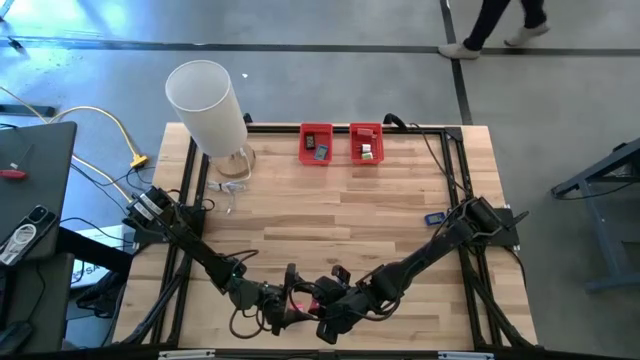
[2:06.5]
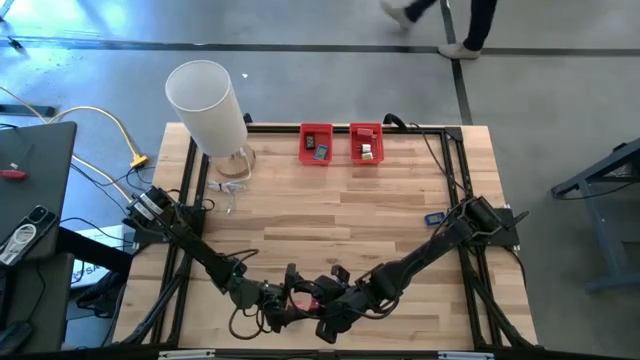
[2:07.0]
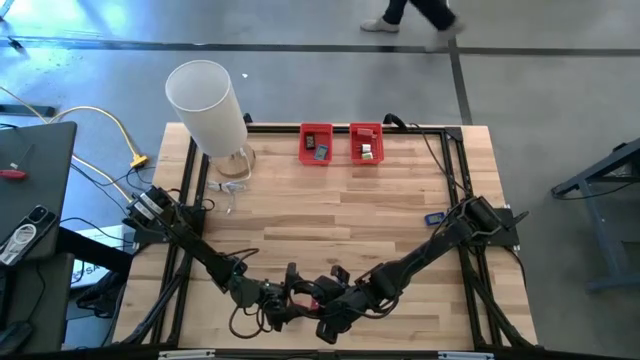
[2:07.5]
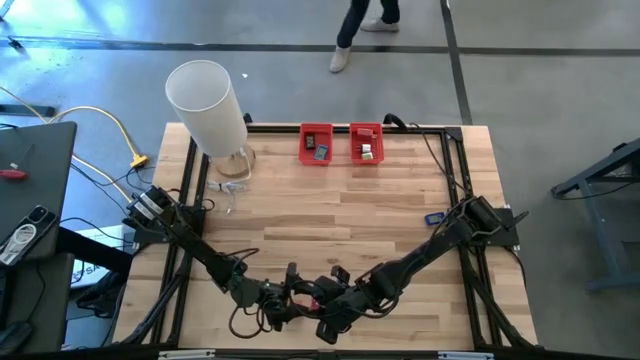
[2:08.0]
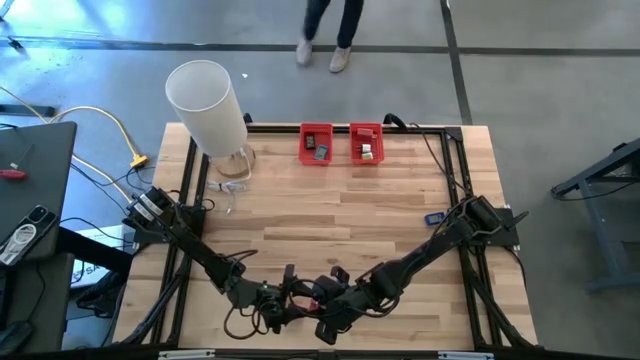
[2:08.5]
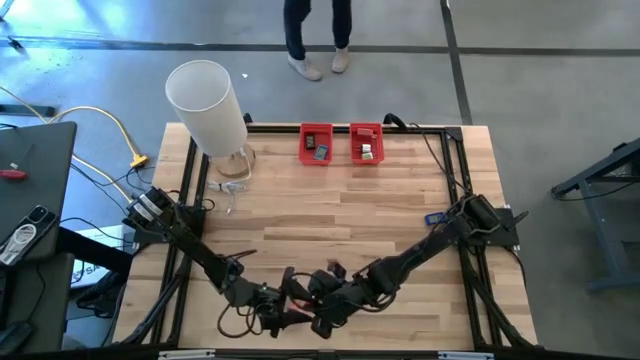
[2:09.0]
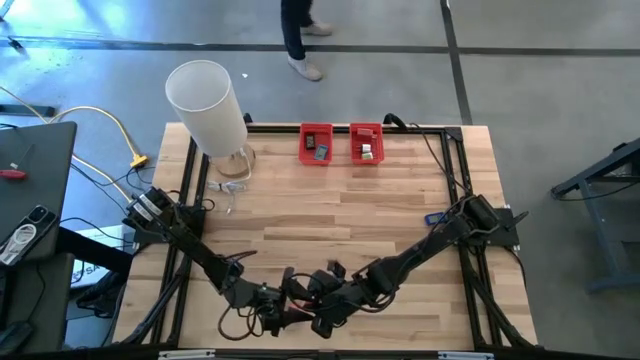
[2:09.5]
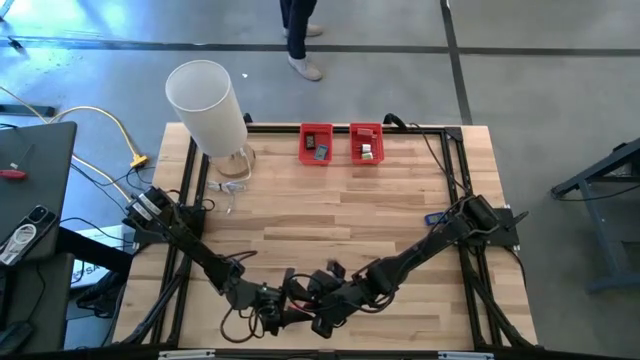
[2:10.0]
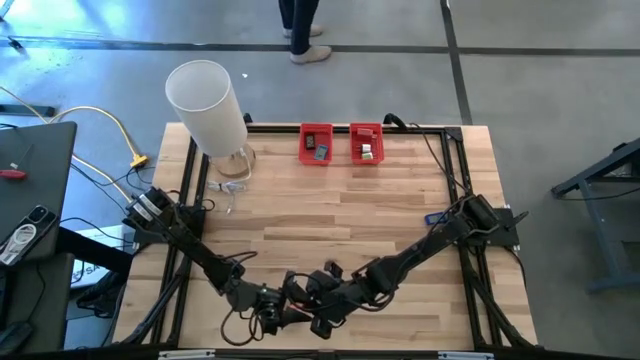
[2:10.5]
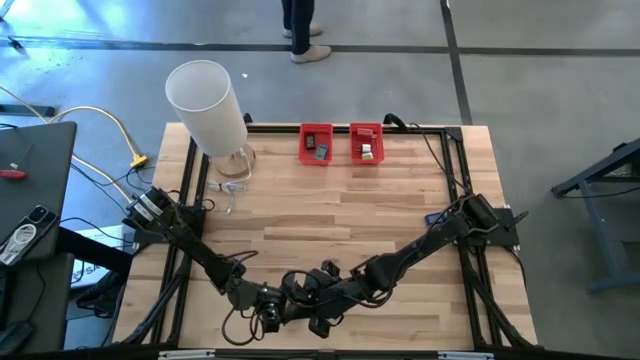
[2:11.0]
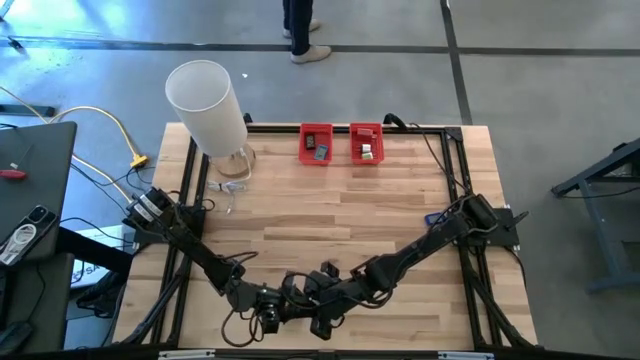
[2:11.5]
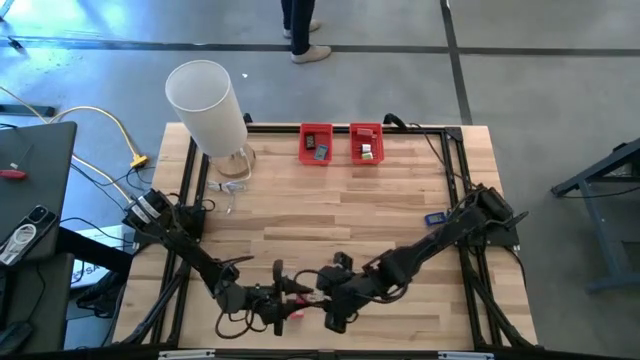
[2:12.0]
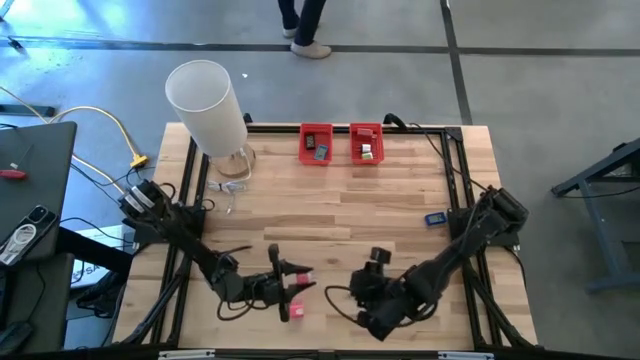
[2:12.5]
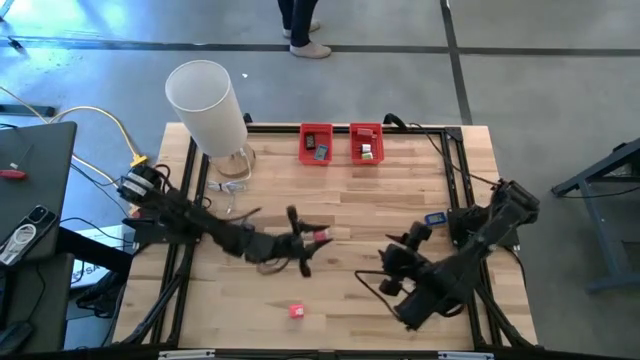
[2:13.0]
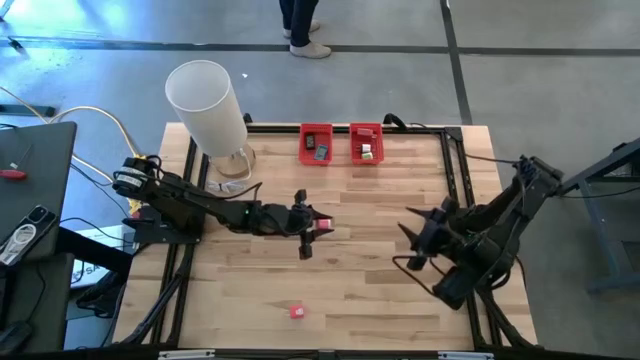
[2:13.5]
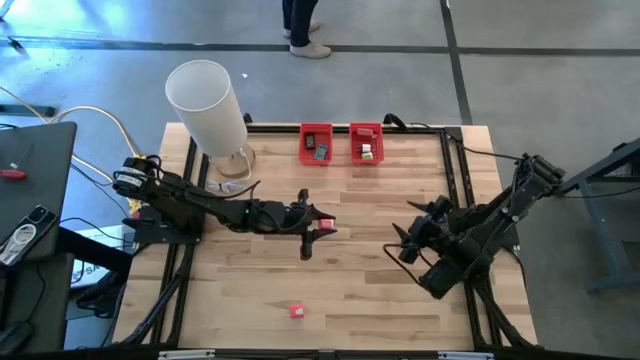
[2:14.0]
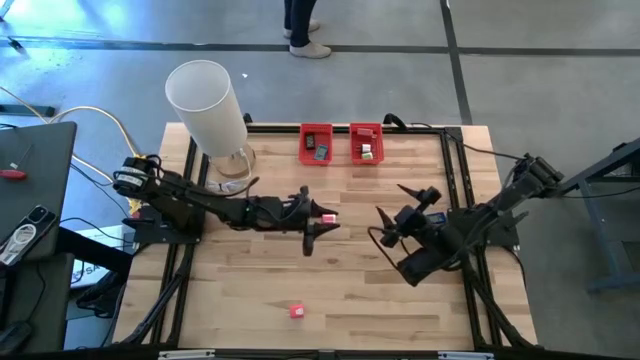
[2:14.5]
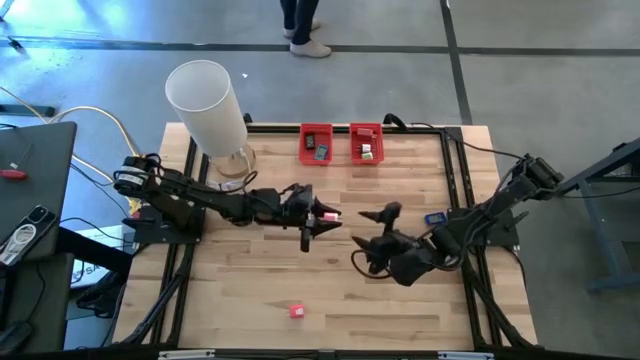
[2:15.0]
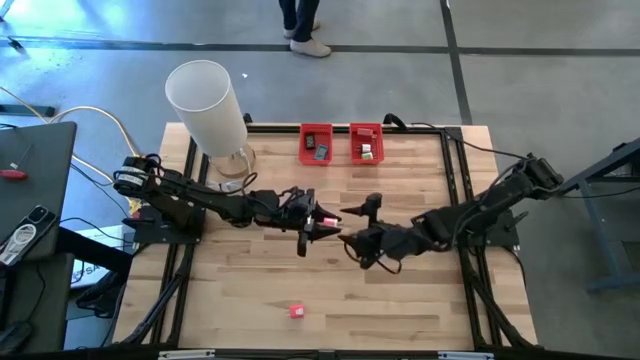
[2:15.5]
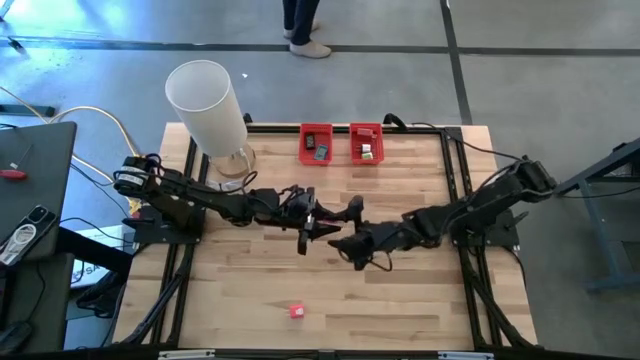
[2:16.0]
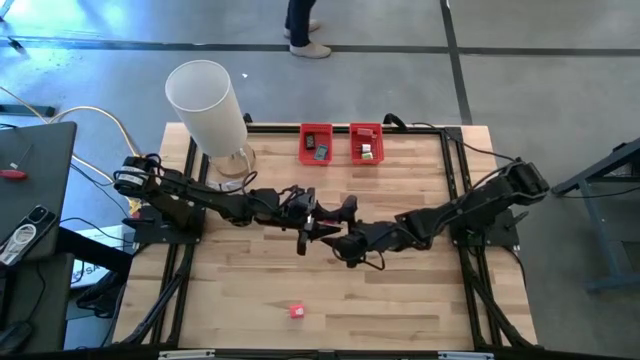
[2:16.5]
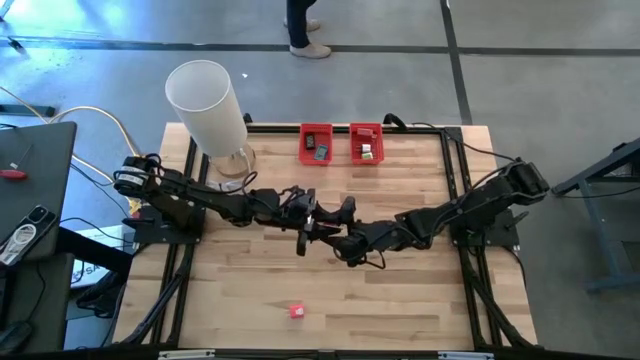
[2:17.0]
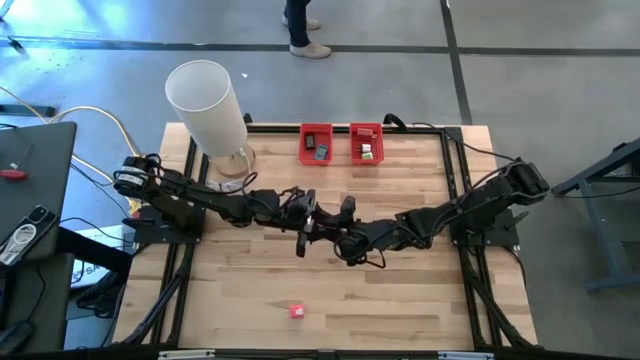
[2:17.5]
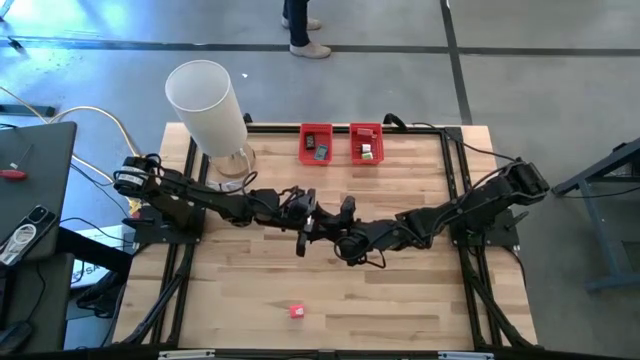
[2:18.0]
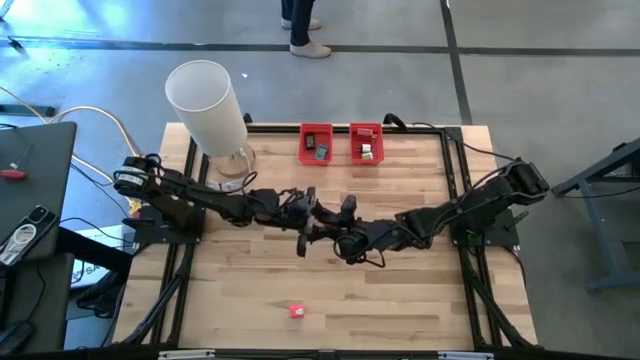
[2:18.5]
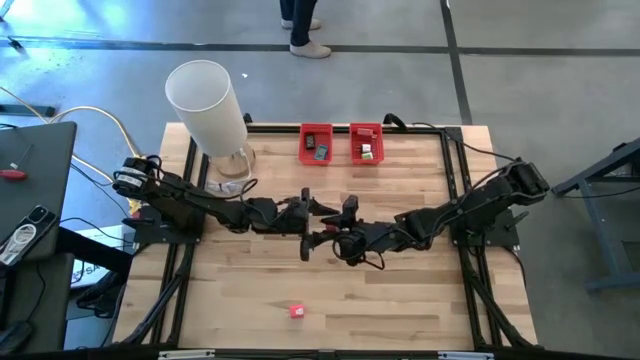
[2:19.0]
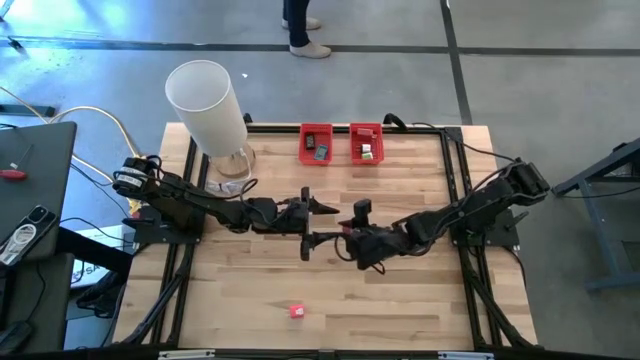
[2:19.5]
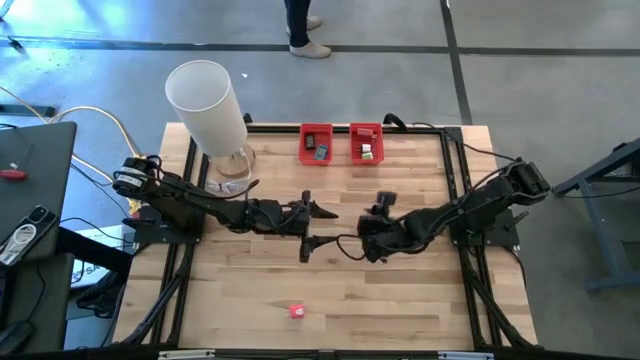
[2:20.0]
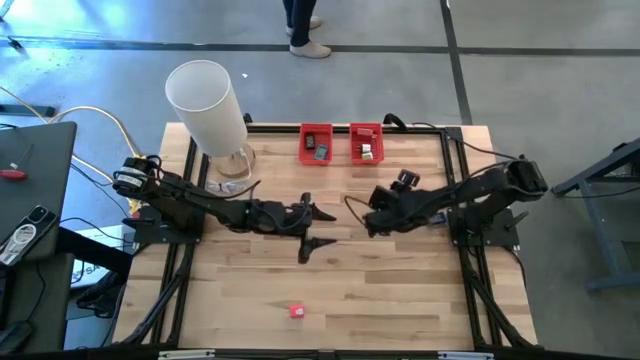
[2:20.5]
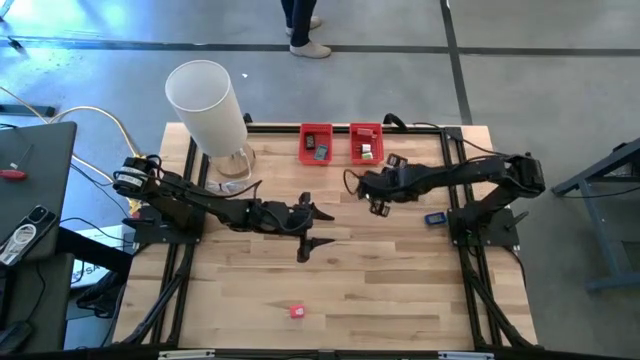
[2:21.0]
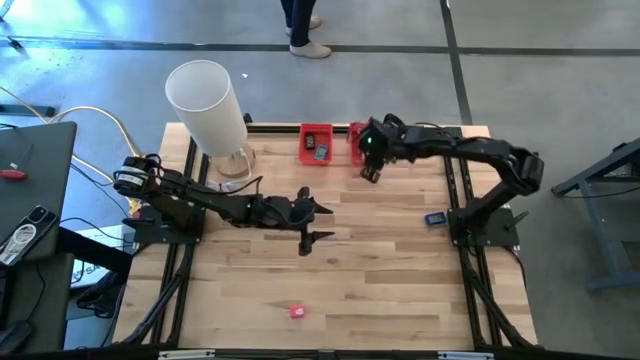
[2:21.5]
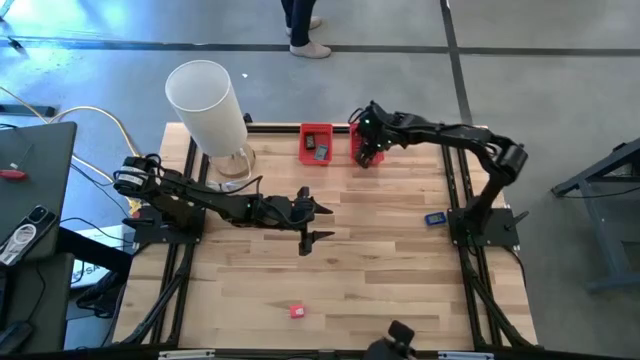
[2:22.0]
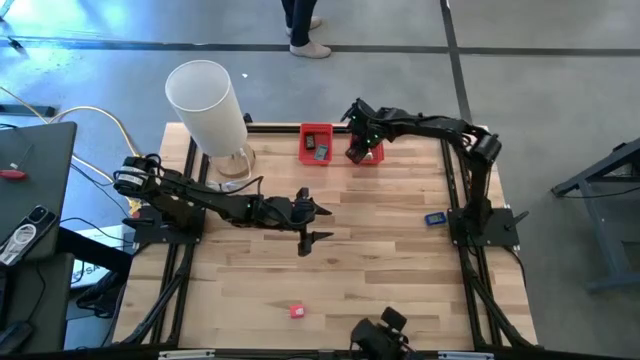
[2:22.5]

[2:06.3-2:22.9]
Task: Pick & Place Office items
Put the pink white charger adapter into the right red bin

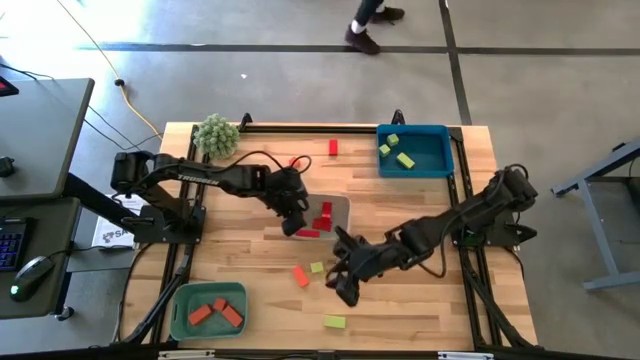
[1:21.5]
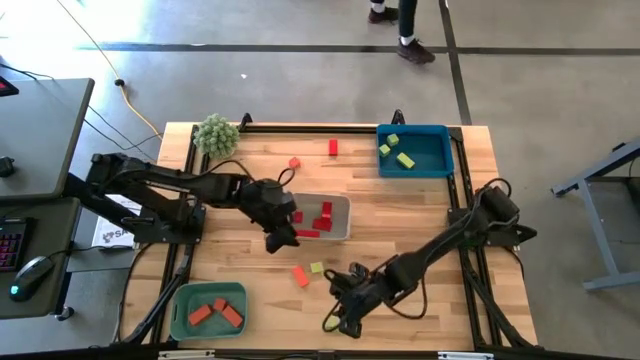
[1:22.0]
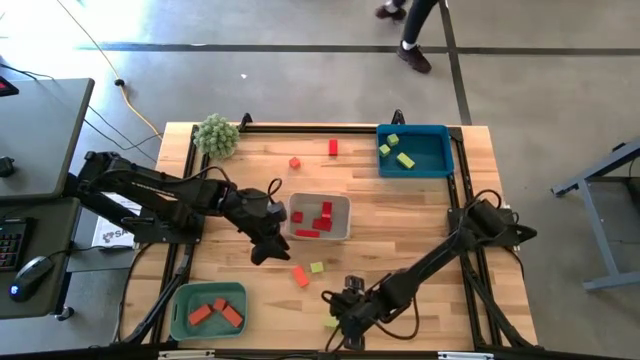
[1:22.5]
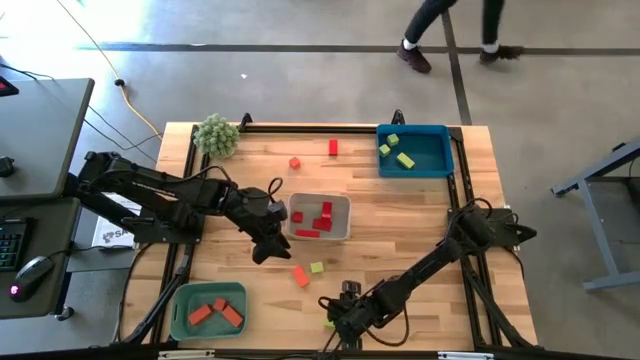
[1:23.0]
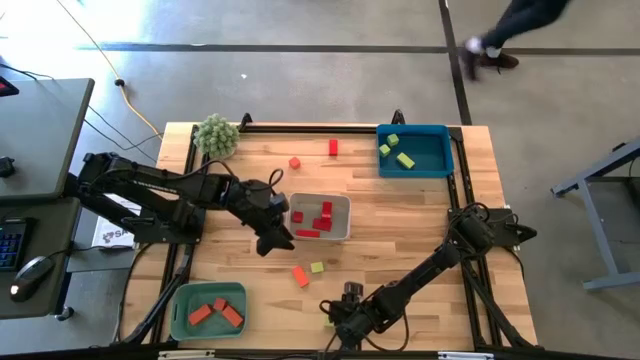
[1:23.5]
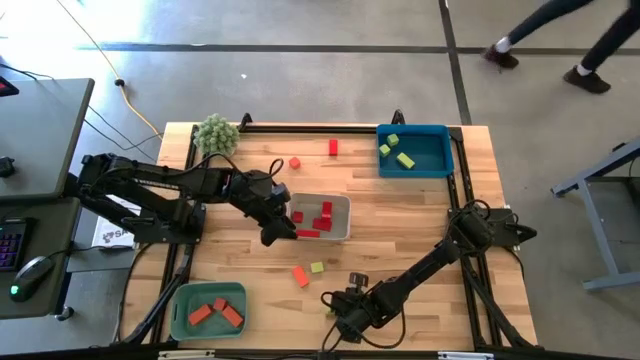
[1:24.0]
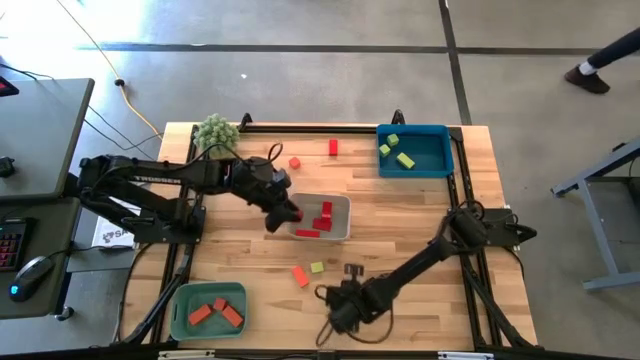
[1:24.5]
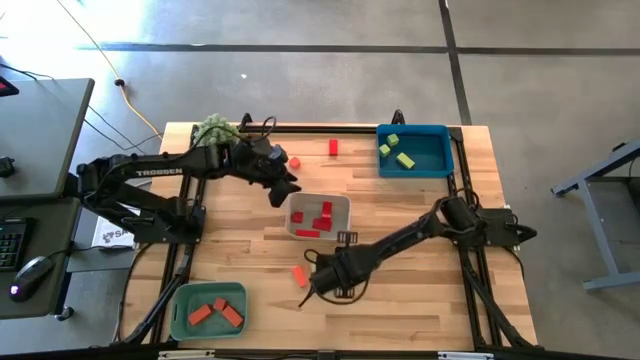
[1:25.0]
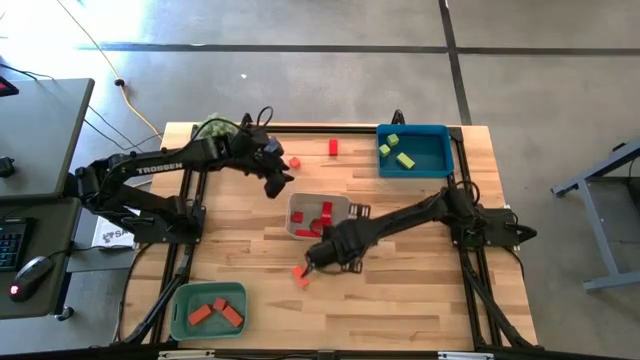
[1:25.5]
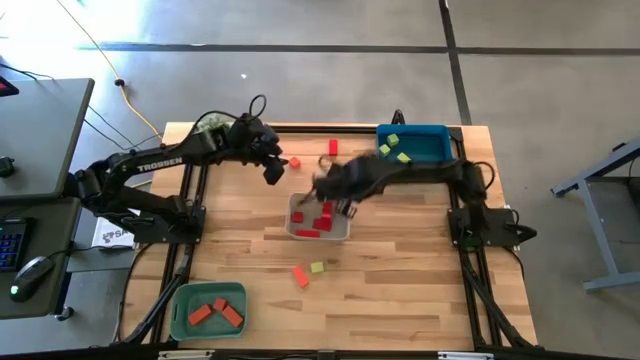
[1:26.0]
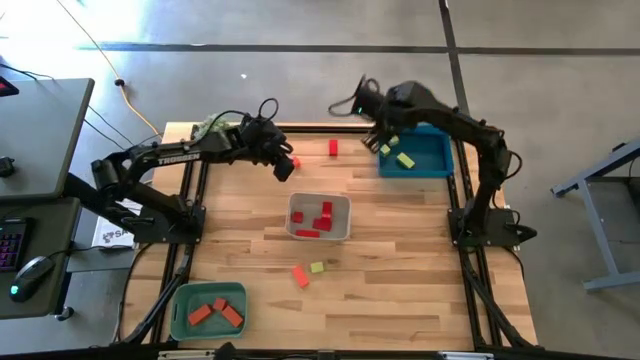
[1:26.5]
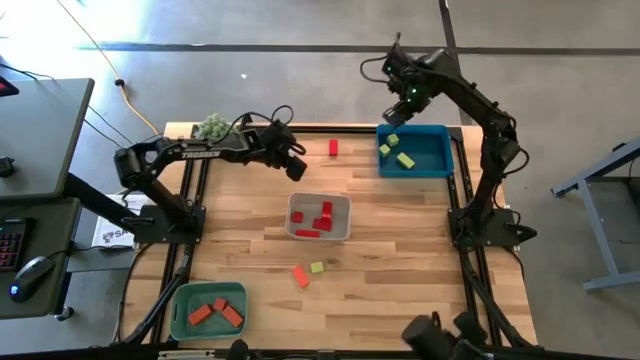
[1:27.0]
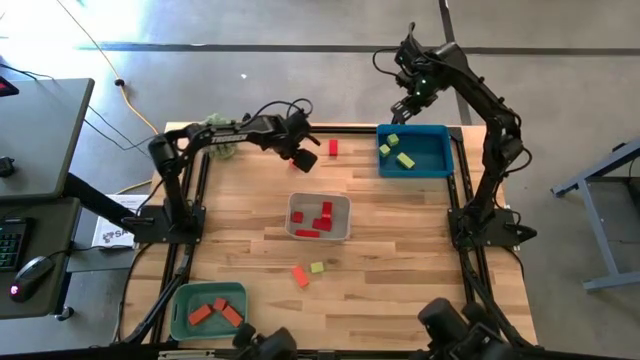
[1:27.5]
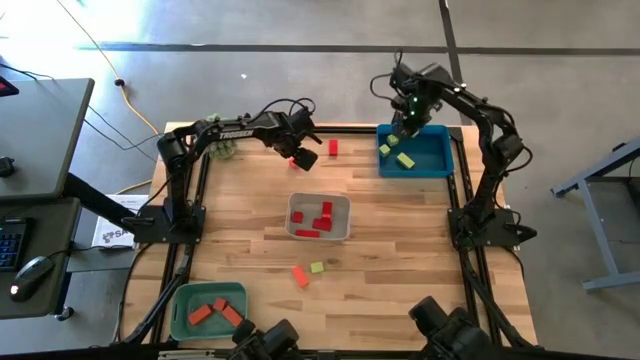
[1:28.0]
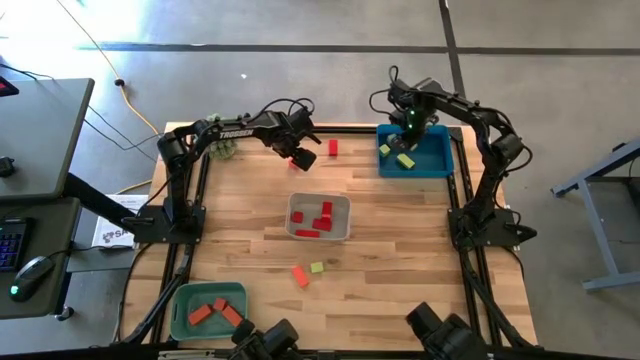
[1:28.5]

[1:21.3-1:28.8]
Task: Sort & place blocks by color
Put the green wooden block into the blue bin
